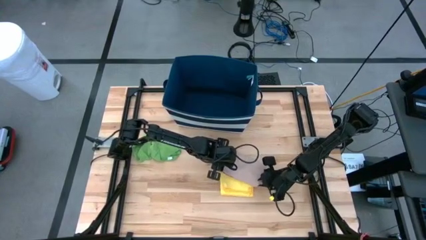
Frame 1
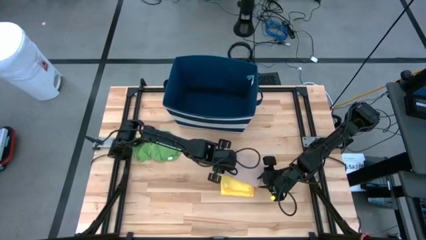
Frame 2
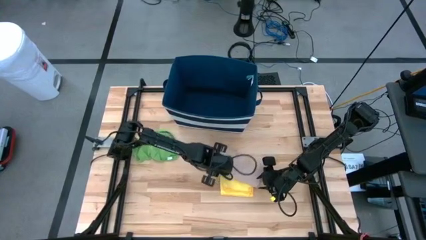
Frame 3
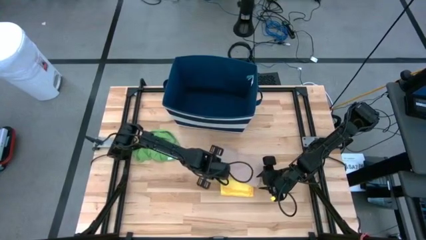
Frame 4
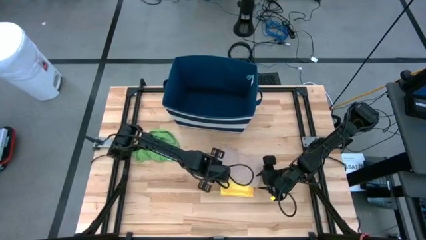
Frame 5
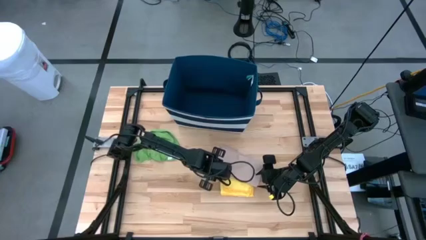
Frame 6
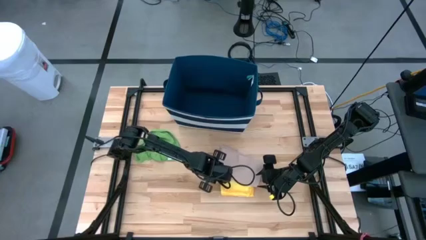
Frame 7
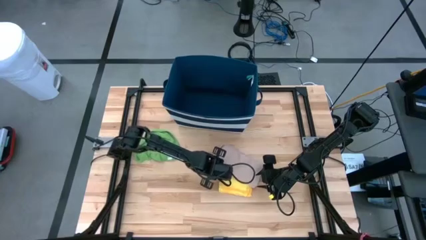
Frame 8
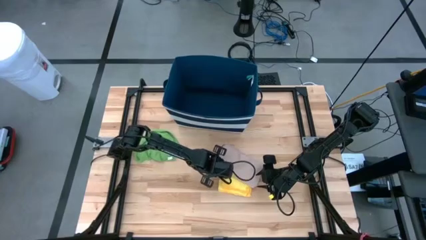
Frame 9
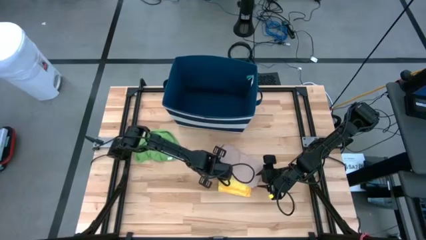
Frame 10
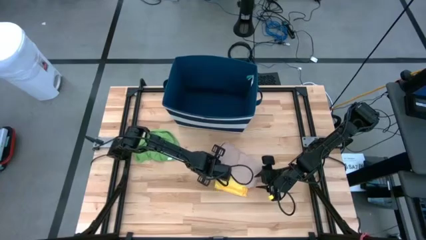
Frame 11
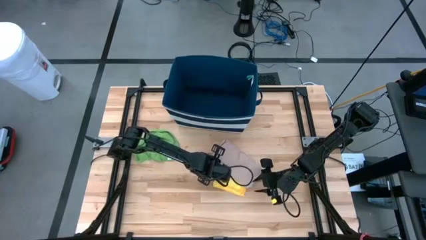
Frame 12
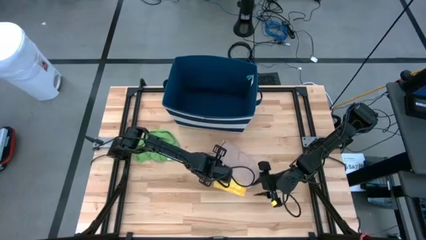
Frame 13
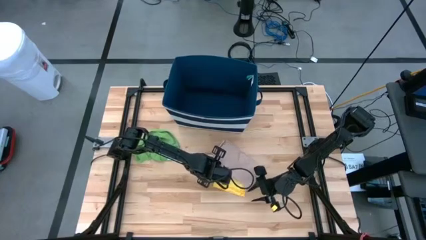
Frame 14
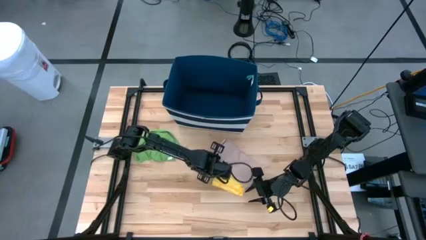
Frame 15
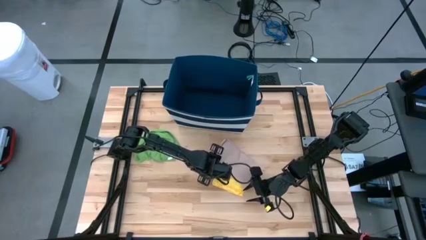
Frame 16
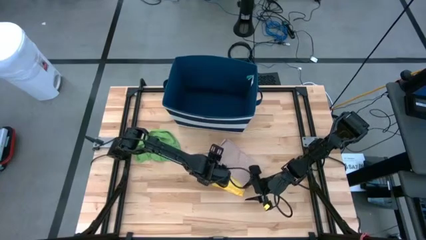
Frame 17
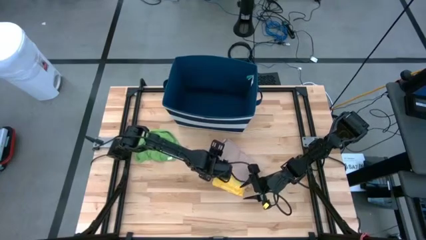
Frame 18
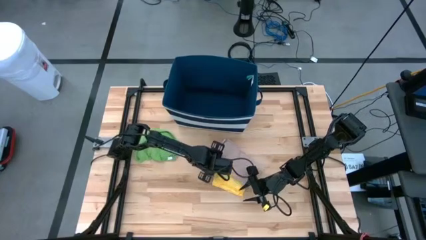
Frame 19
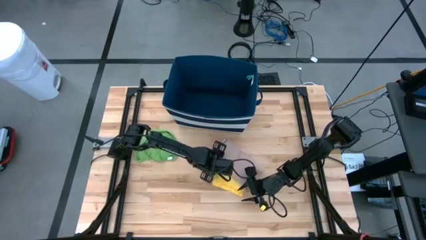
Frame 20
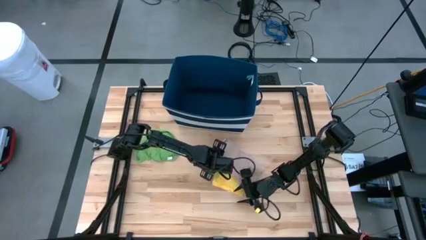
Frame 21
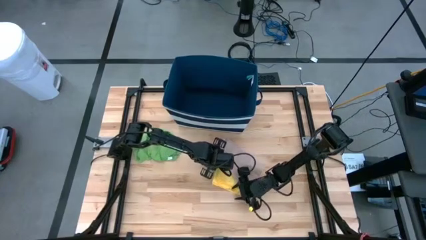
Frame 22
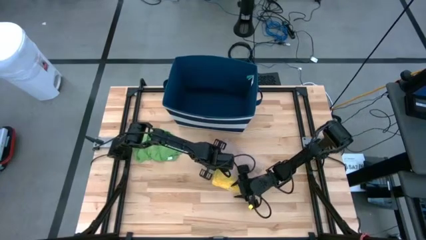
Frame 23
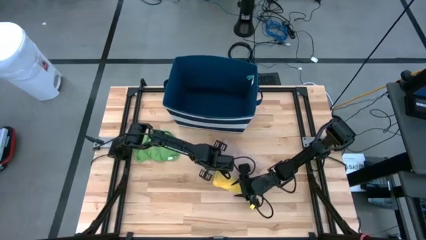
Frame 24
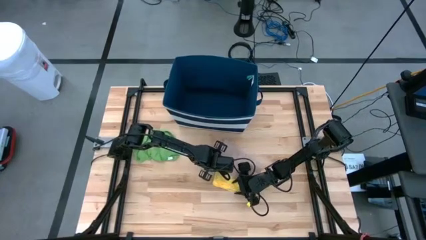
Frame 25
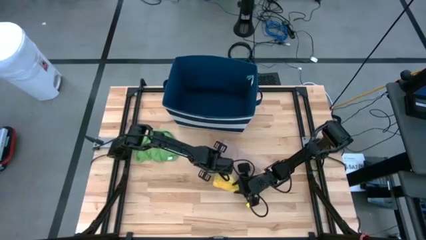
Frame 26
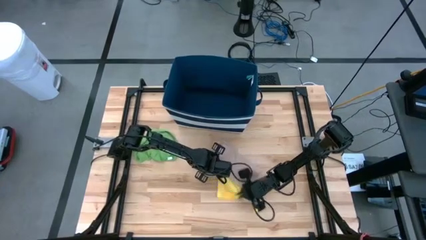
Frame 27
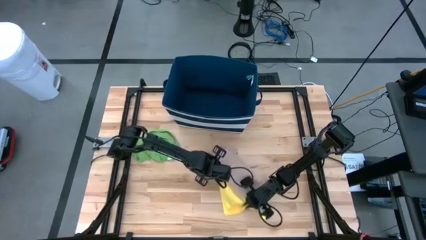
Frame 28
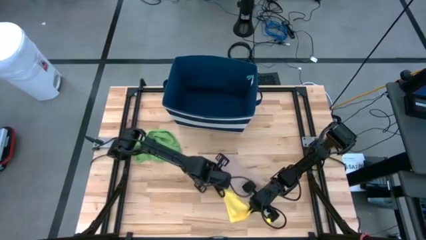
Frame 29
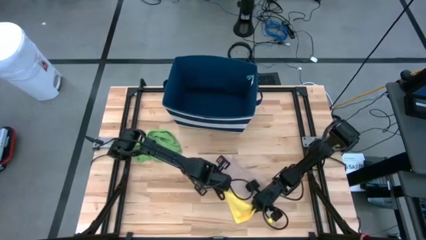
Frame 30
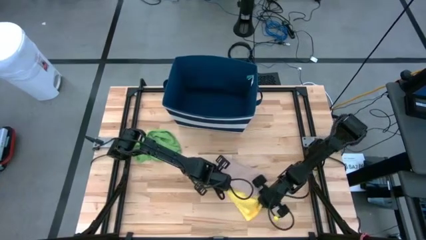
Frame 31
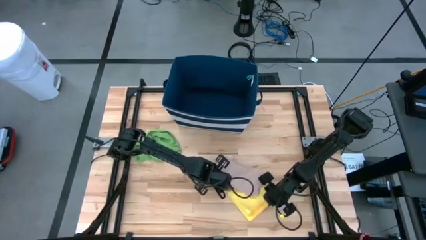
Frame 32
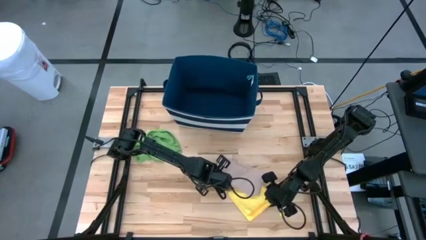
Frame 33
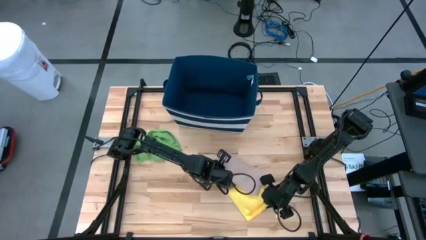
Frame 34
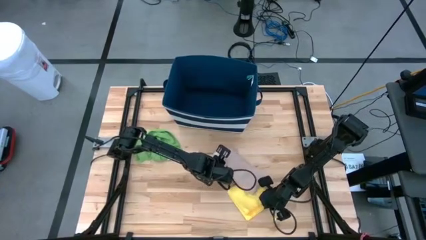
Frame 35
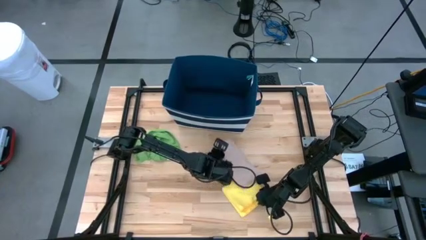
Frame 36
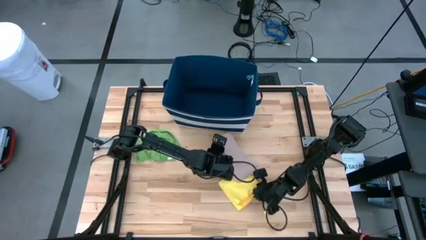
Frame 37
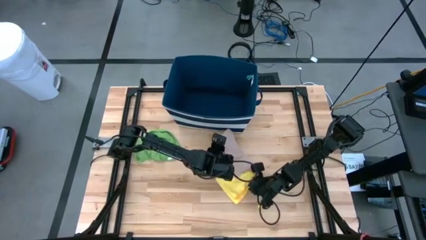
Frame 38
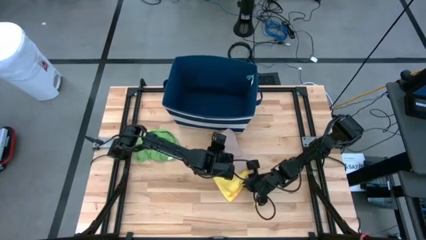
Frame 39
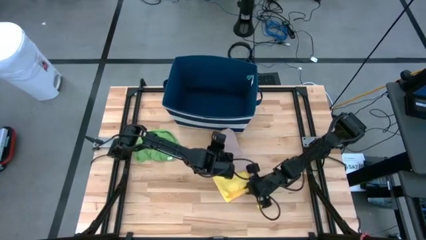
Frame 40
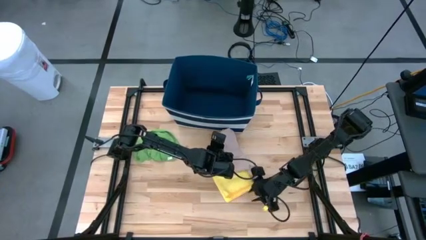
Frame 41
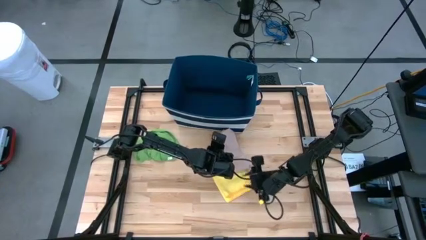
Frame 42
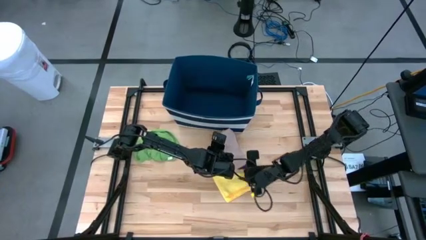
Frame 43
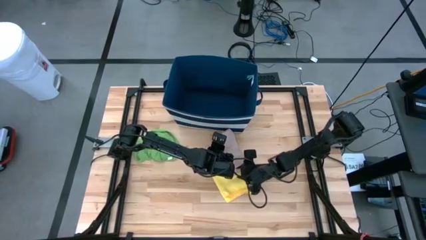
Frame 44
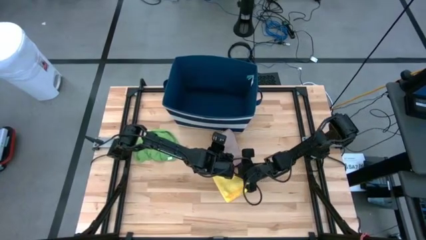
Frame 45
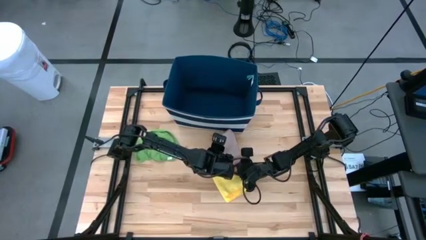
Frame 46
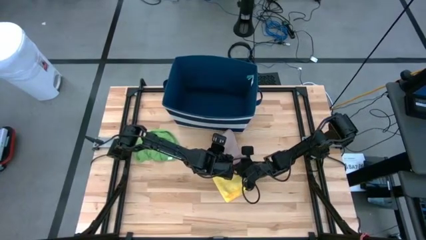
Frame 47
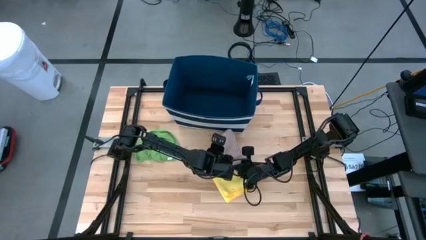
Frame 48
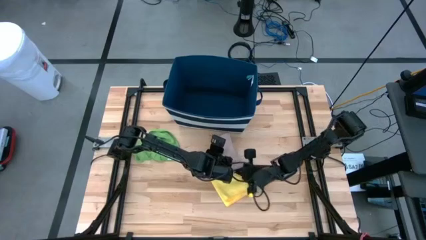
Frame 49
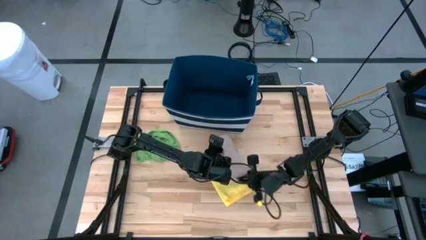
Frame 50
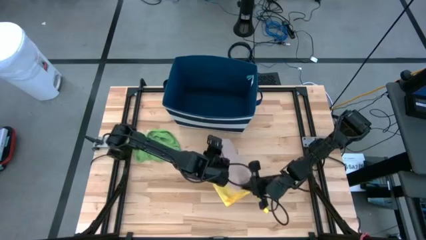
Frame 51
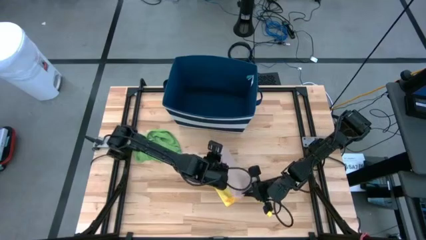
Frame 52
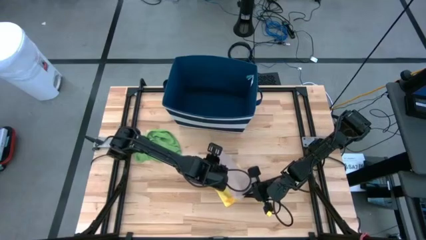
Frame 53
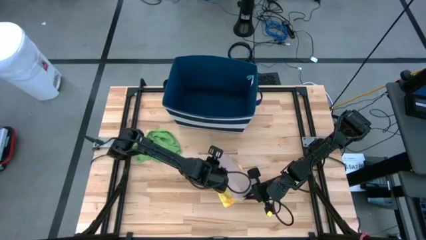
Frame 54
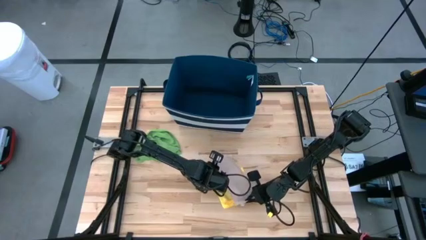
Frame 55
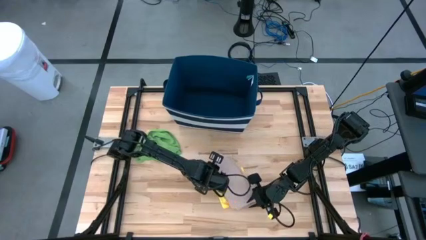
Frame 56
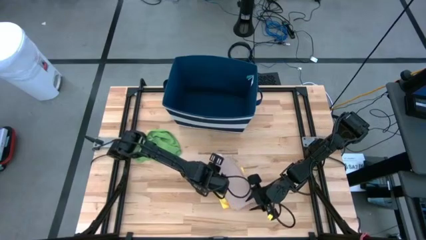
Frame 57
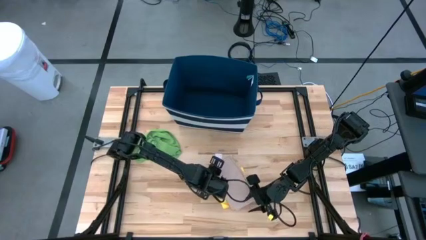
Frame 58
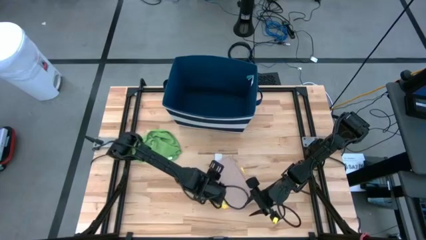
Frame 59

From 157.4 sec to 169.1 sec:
Task: Fold towel
Stack the brown towel on top of the yellow towel

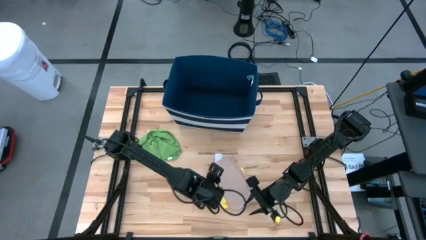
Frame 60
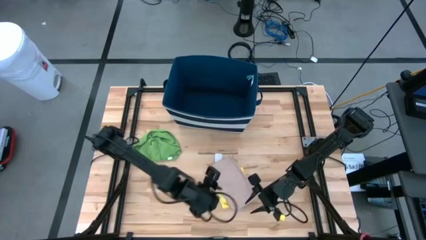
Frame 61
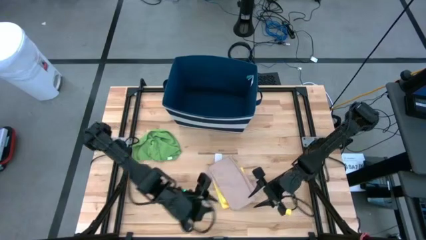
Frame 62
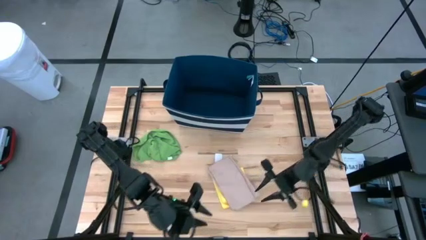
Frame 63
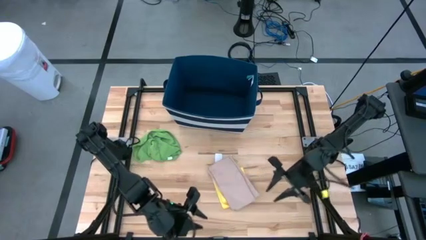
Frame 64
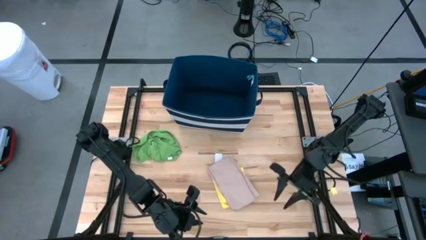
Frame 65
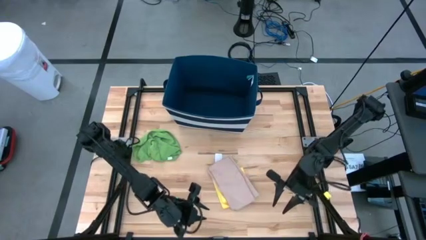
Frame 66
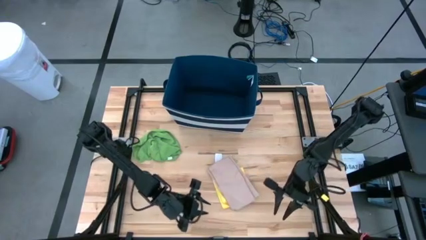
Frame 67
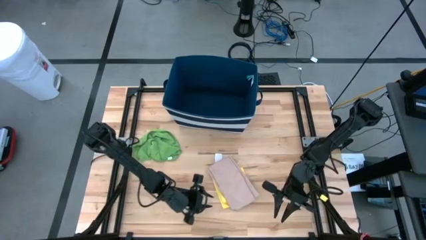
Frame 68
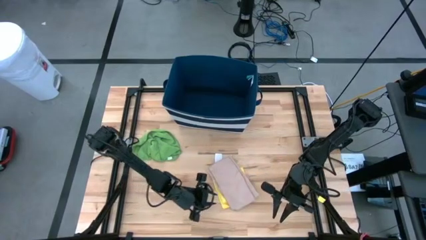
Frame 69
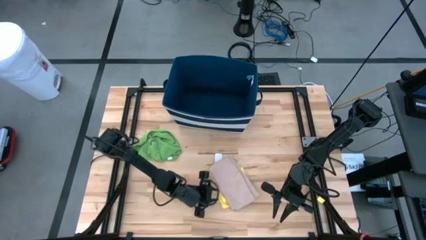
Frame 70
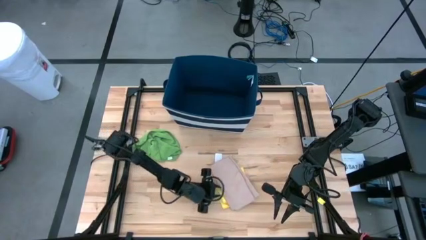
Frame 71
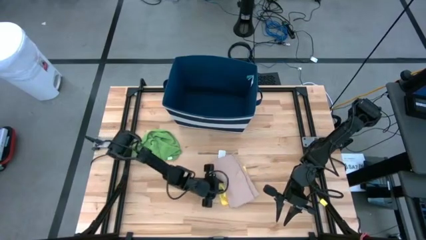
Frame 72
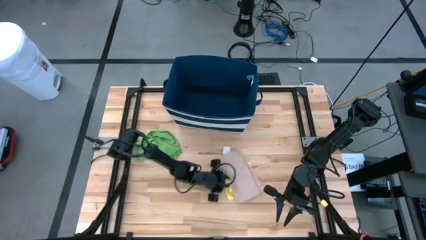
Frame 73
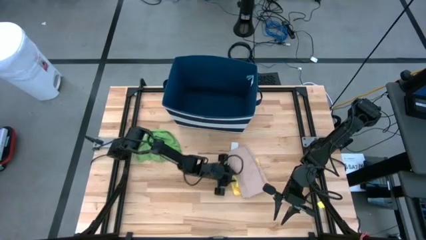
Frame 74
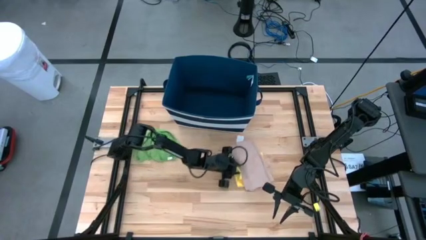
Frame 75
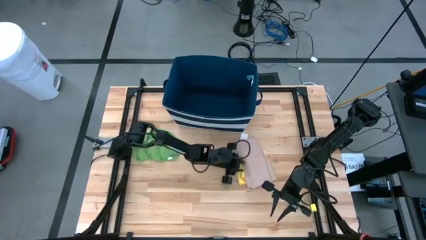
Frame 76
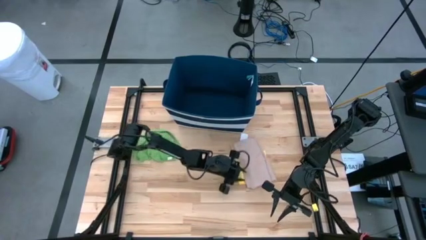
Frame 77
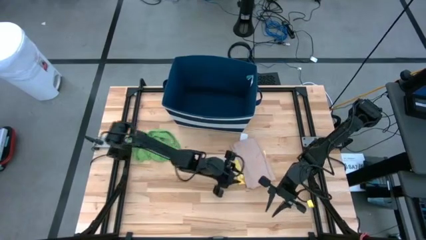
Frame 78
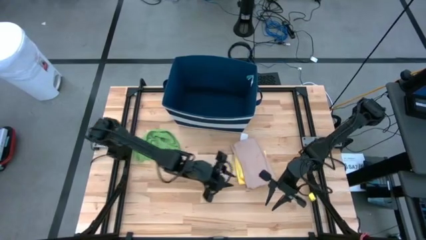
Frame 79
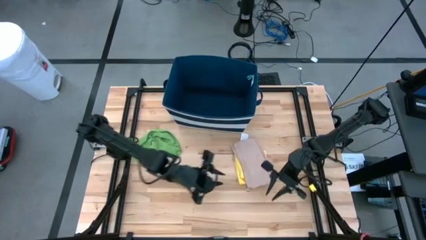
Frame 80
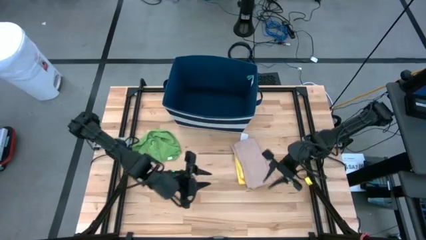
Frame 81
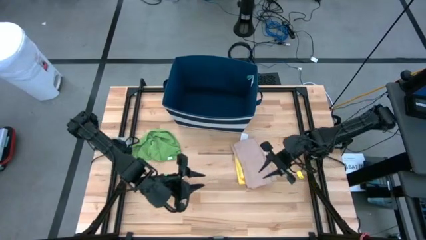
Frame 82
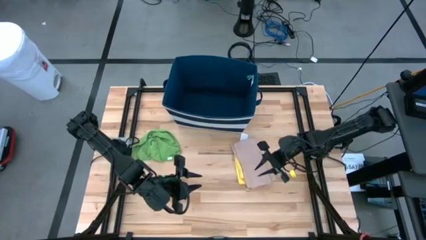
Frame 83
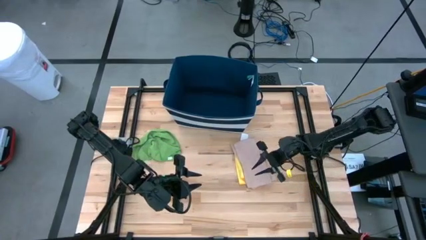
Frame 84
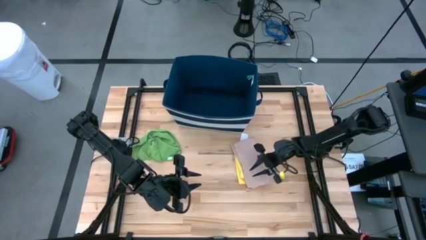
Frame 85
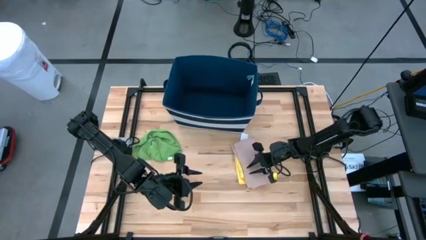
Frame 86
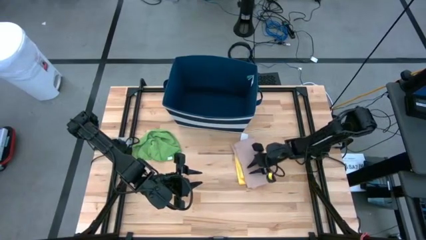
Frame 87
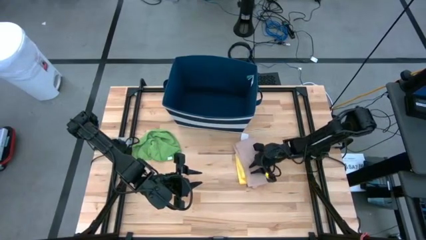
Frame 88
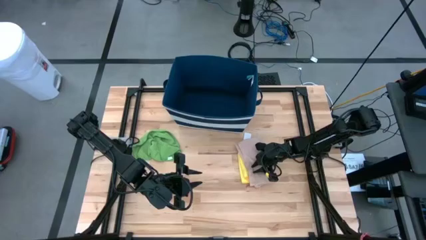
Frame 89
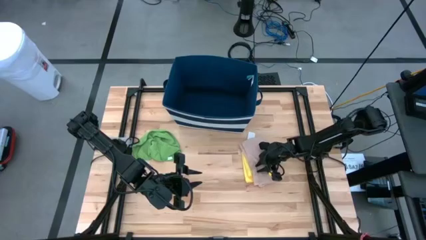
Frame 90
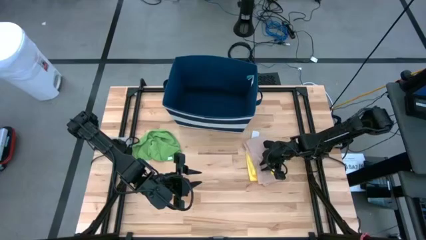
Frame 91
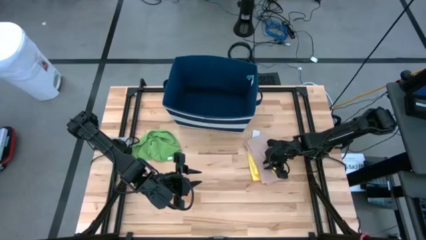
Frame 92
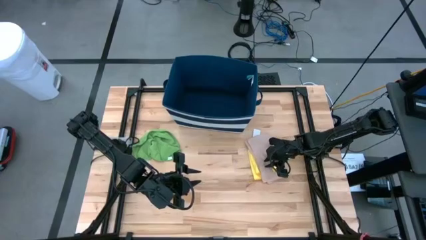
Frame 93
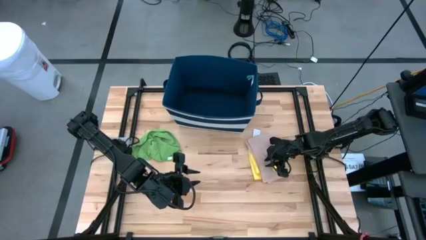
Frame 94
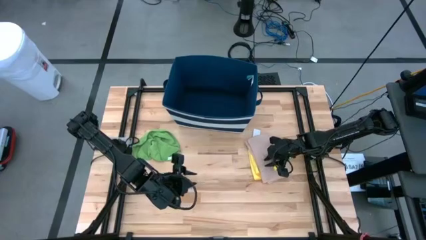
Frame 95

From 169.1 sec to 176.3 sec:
Move the stacked towels to the right of the table
